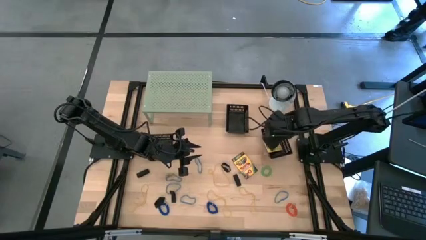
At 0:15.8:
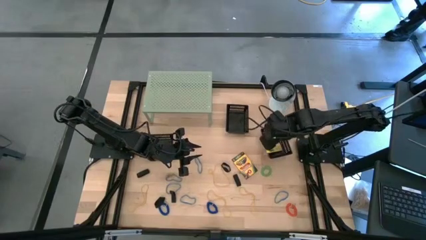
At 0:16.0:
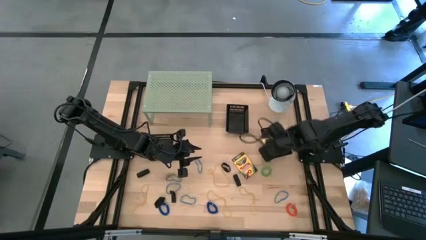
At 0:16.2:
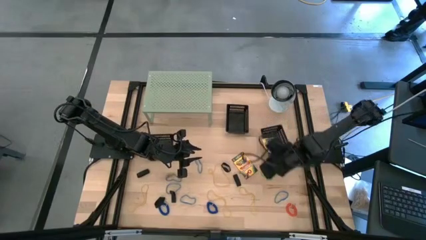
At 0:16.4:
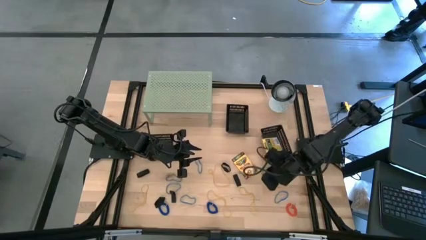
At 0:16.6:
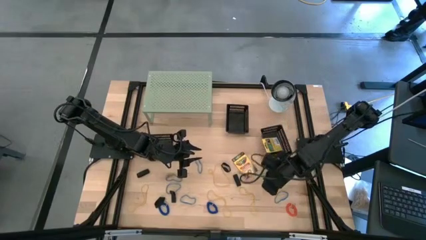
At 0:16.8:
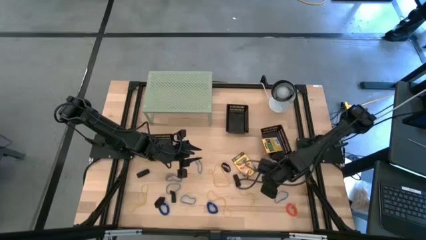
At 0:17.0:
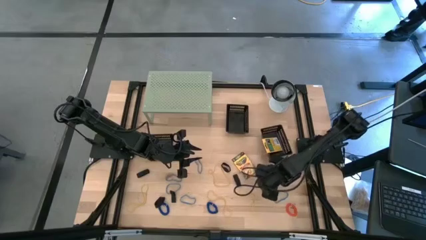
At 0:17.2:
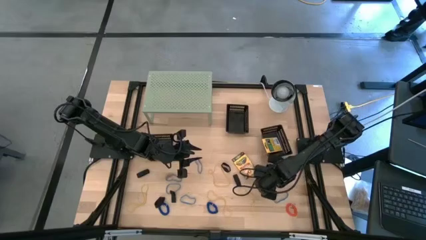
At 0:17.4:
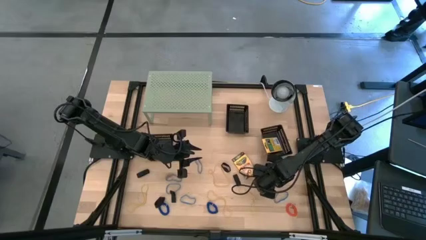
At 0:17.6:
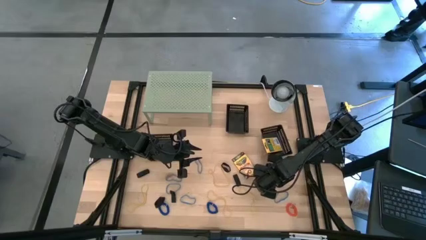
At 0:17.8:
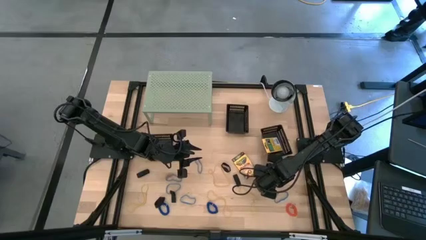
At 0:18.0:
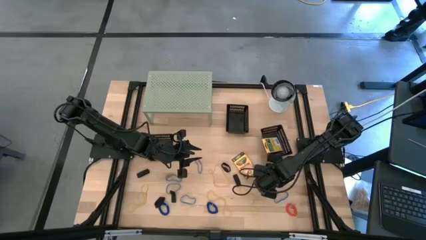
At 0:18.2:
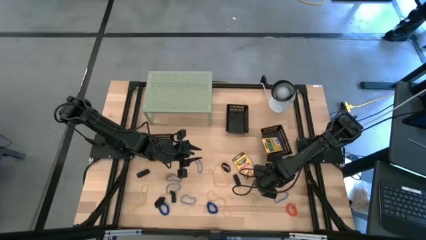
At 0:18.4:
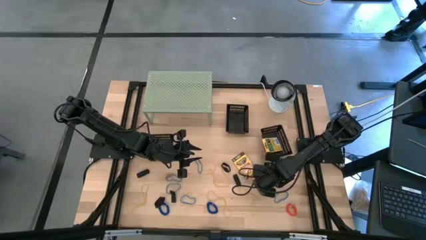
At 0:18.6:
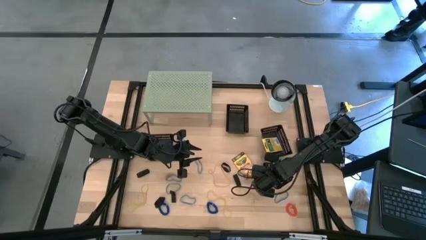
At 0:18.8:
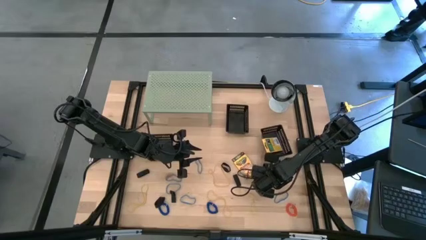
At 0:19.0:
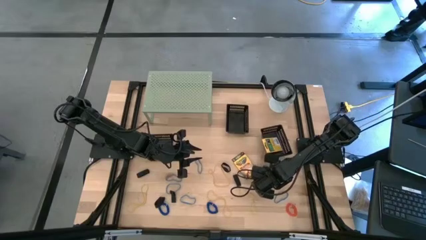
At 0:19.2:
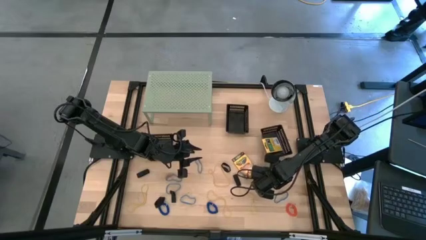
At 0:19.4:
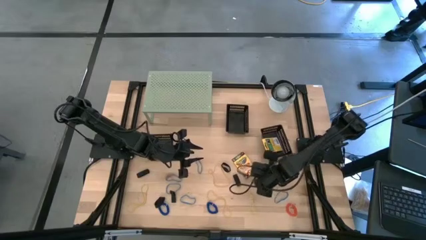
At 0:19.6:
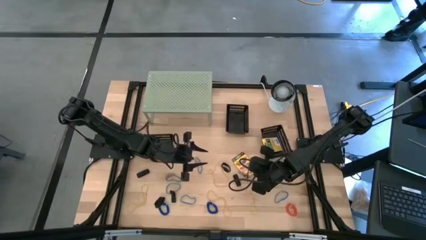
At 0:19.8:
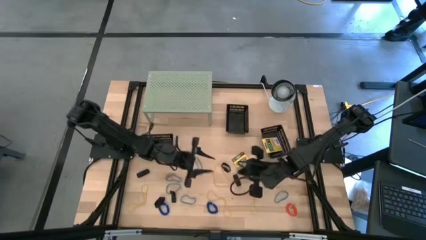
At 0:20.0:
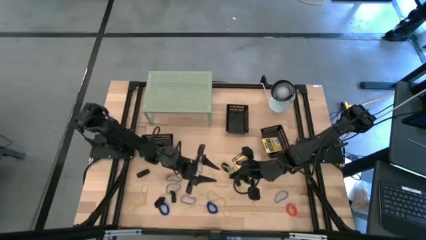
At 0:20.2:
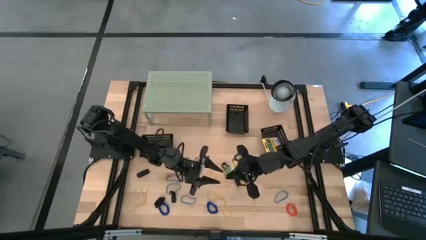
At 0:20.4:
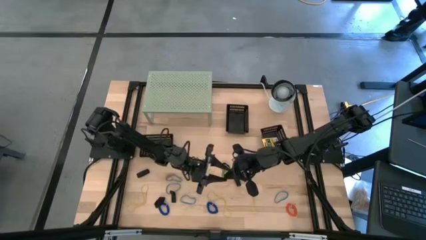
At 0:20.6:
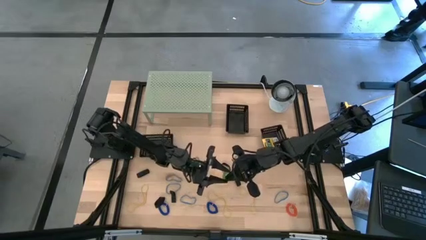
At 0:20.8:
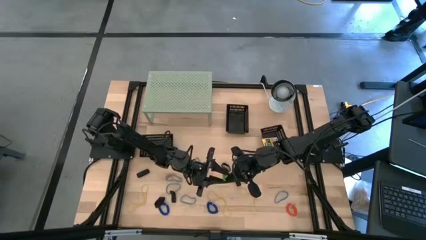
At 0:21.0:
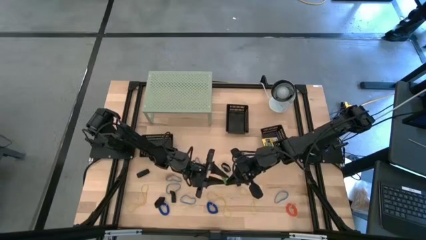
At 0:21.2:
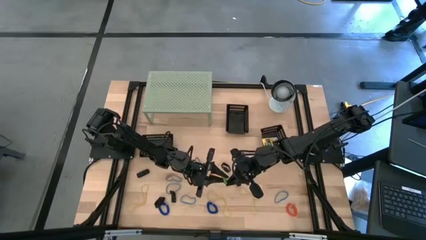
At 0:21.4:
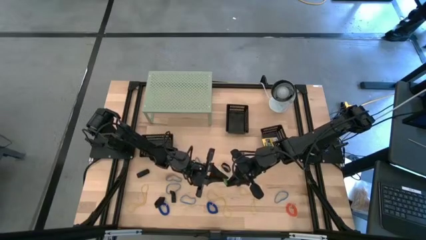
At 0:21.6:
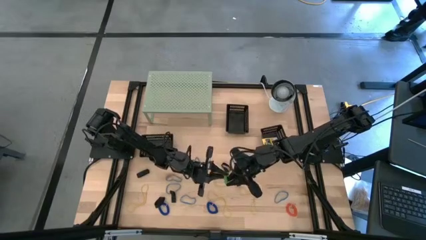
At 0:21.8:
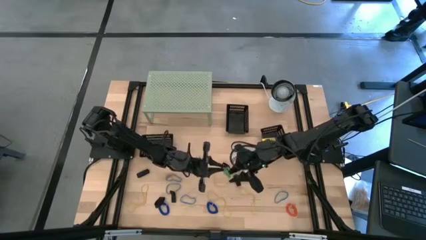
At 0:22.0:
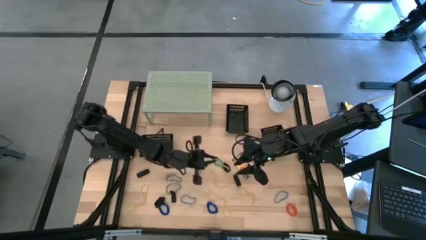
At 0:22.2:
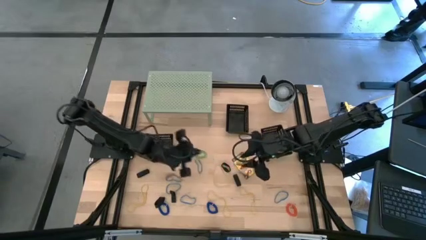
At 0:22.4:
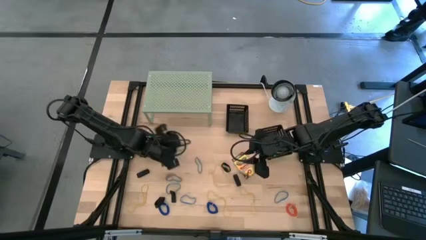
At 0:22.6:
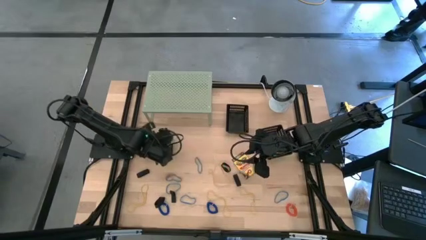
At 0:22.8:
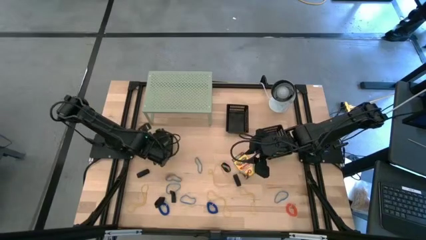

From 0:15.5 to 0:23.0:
Task: Pick & Place Office Desk Supplies
Put the green spring rubber band into the left black bin

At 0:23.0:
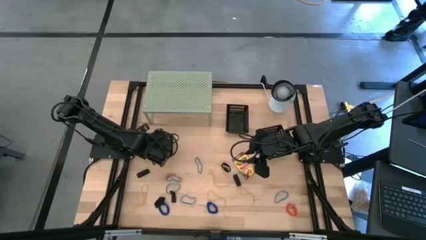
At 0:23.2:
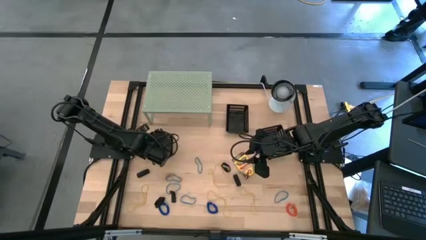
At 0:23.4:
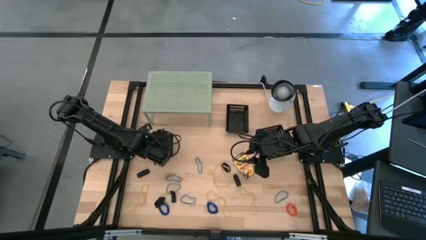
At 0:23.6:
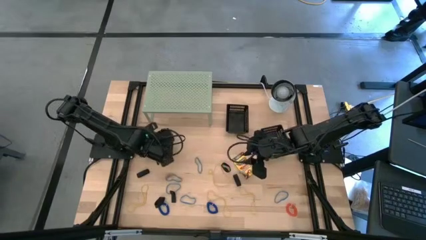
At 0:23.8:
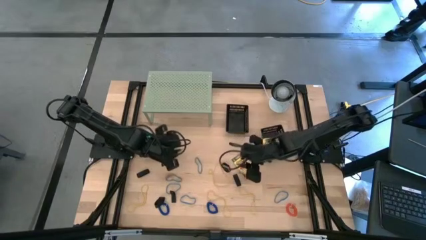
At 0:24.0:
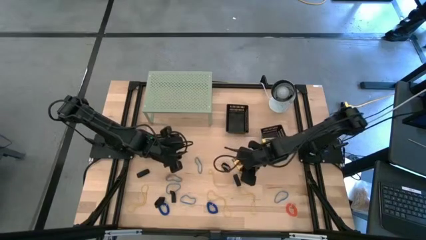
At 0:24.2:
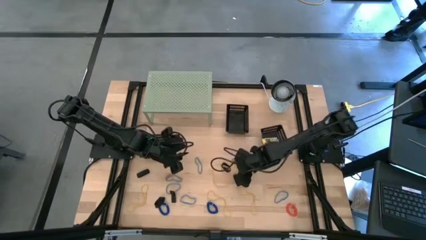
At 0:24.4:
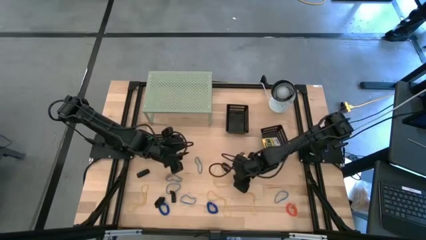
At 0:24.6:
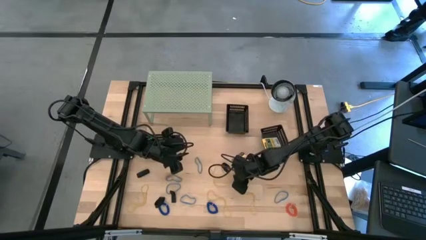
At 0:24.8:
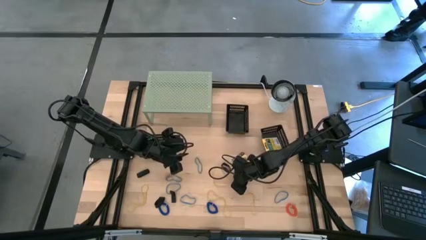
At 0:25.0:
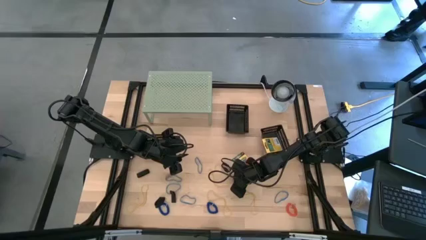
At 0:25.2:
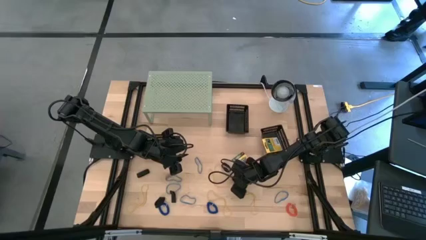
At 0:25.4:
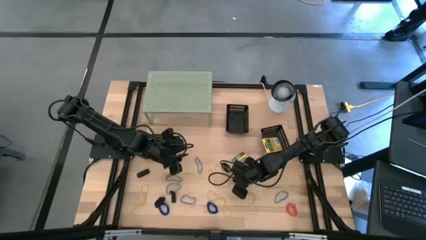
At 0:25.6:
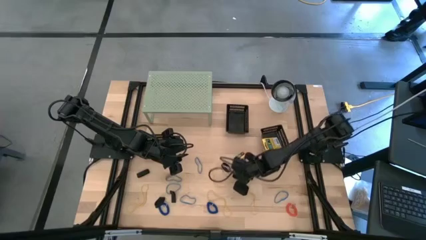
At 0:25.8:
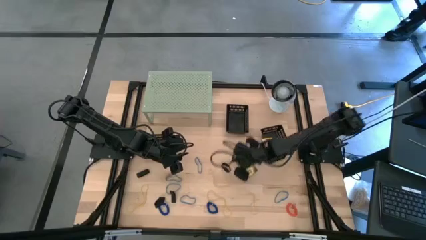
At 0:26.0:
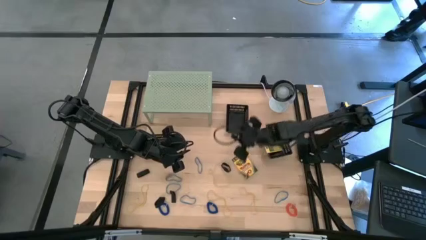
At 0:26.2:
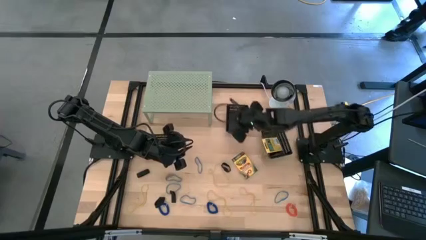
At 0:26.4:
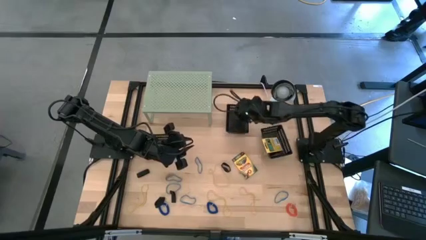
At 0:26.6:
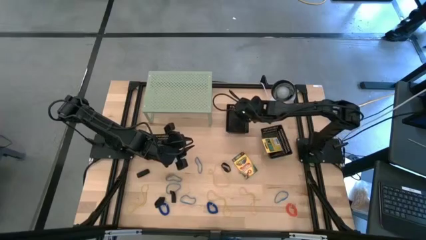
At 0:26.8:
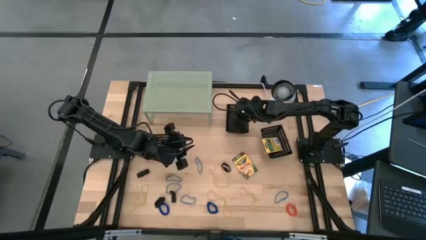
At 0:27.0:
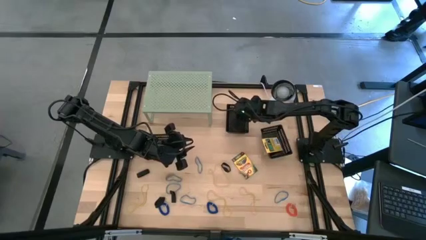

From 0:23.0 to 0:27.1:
Put the black rubber band into the top black bin

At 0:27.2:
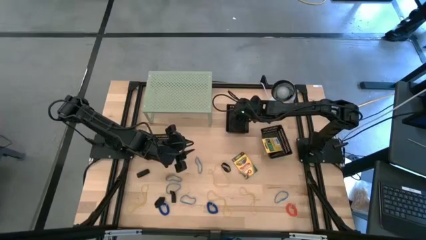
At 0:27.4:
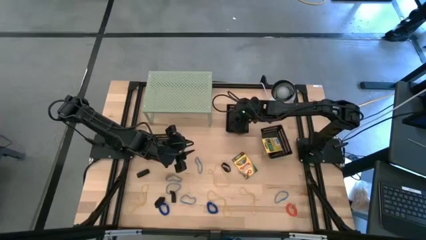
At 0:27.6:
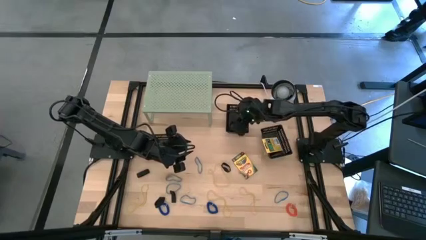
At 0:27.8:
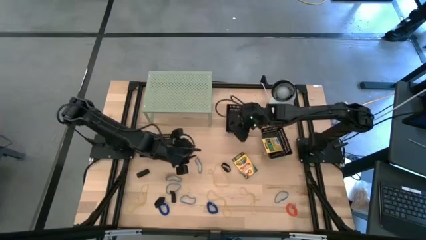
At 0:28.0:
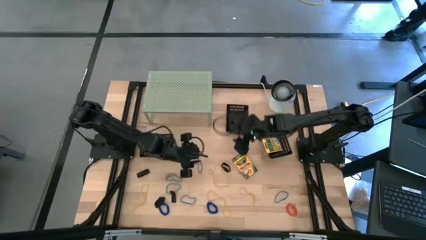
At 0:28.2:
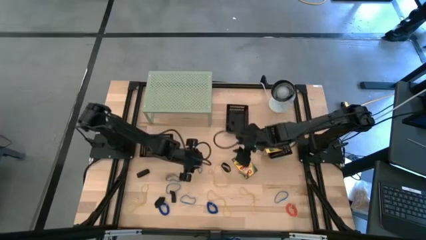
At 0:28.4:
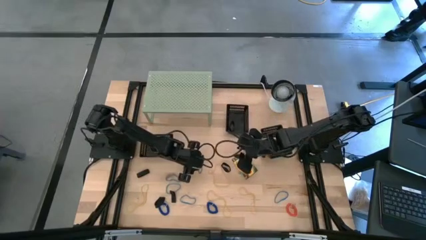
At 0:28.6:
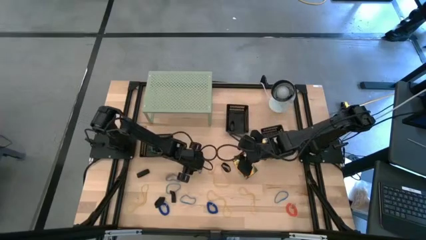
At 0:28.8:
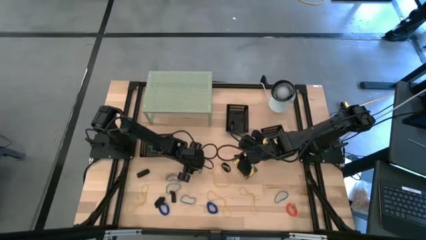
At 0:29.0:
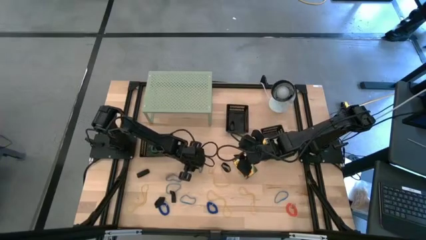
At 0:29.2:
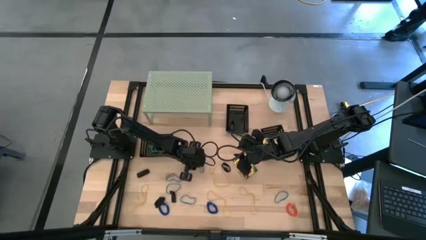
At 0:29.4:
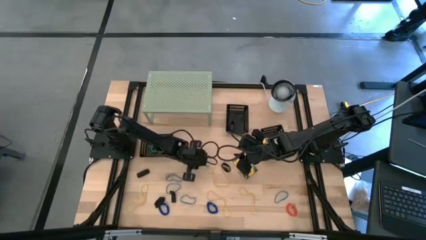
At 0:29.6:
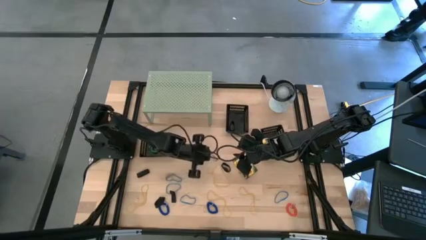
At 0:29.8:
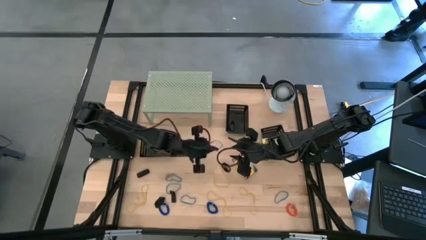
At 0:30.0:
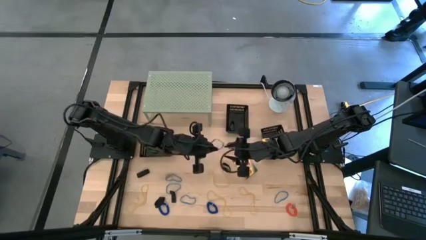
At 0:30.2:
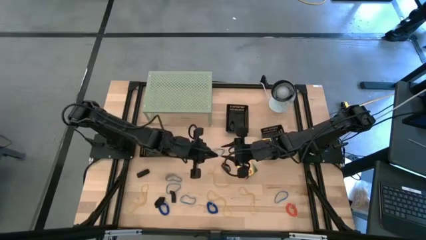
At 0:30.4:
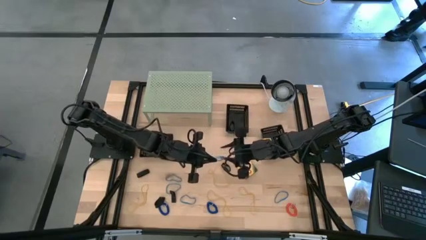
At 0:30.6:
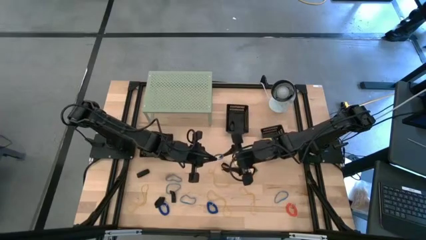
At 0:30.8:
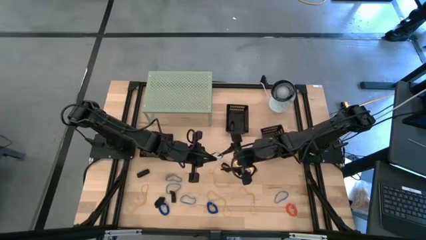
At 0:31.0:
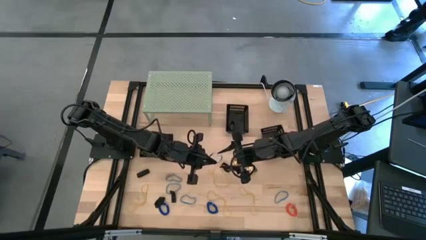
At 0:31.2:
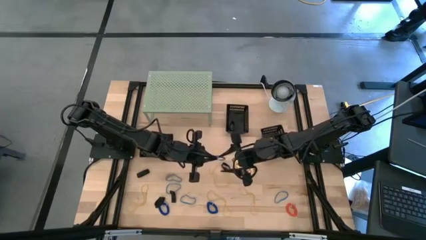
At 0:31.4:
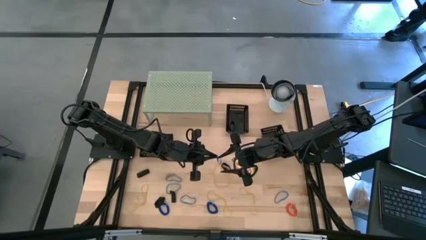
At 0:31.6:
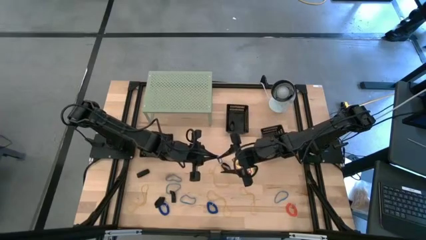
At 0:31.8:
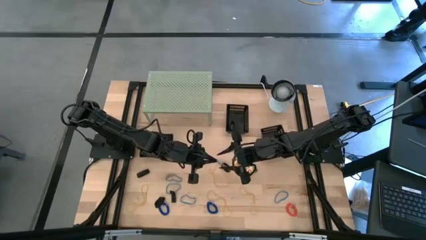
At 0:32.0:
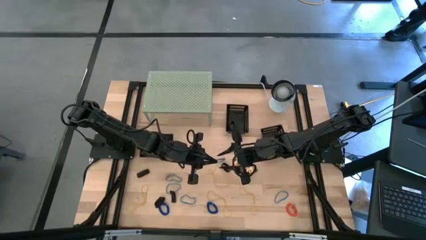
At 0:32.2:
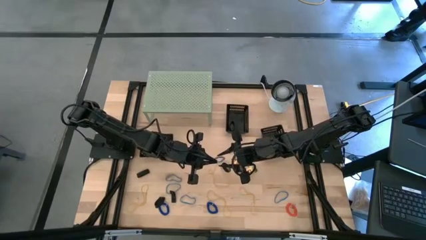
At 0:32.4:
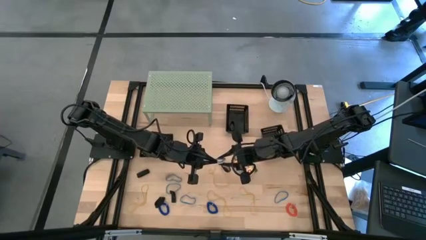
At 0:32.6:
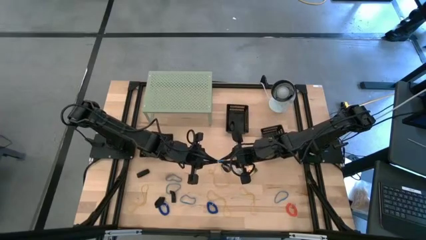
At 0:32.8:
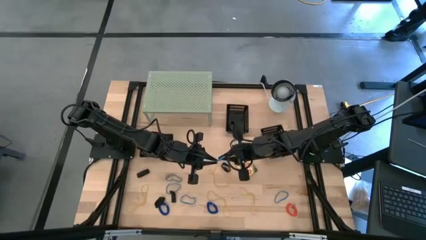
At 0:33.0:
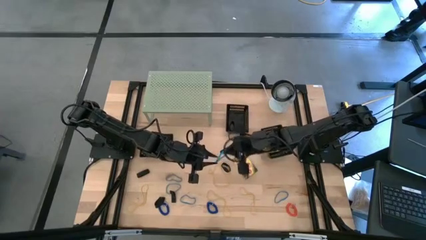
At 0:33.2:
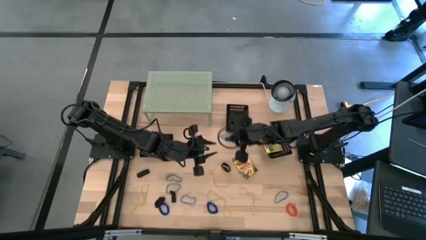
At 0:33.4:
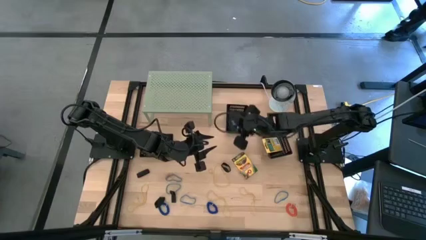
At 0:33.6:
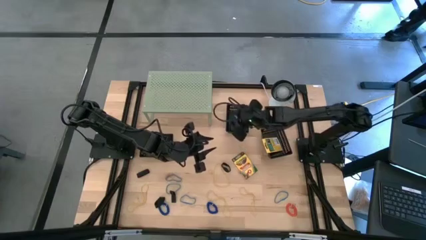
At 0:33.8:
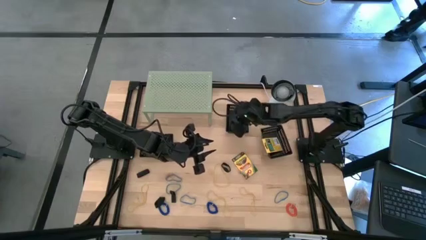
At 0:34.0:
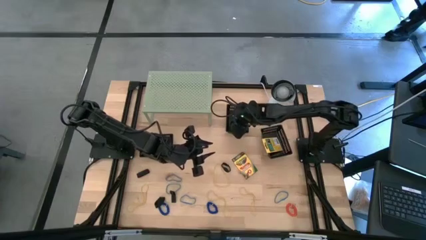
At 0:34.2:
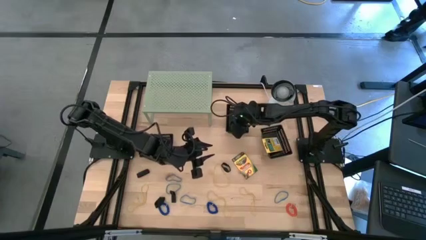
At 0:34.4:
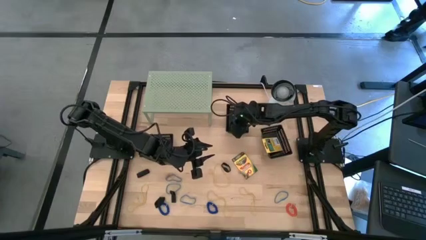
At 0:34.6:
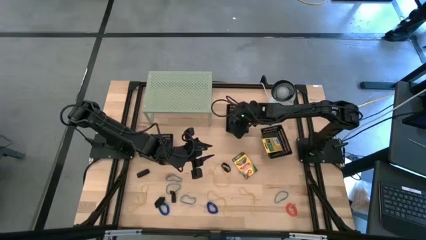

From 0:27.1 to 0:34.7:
Put the blue rubber band into the top black bin
